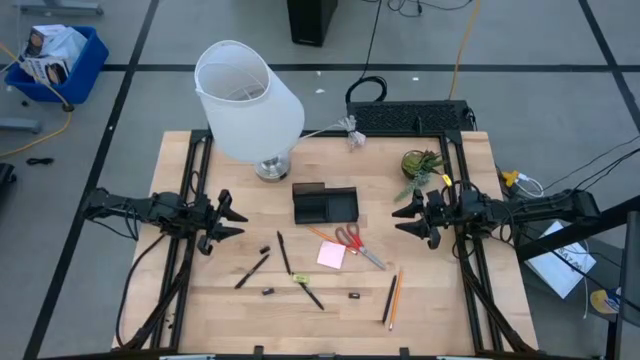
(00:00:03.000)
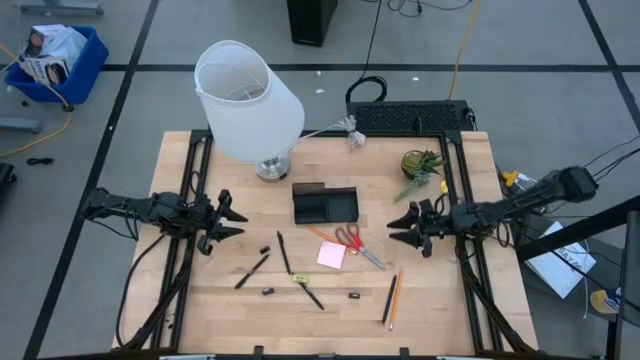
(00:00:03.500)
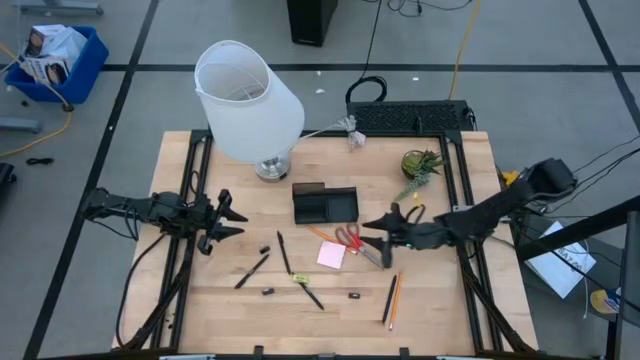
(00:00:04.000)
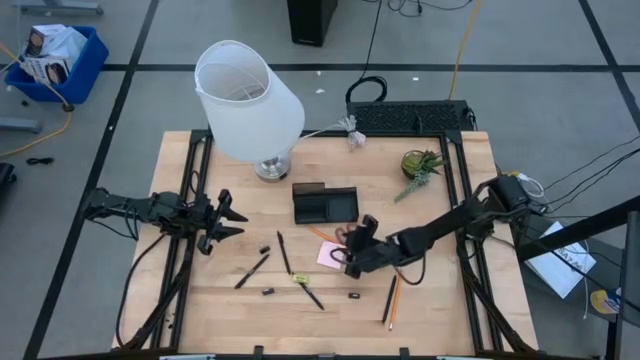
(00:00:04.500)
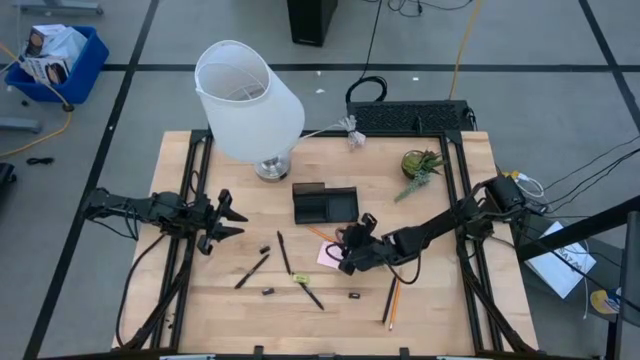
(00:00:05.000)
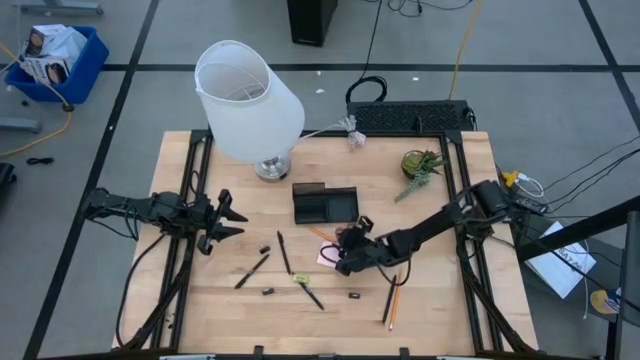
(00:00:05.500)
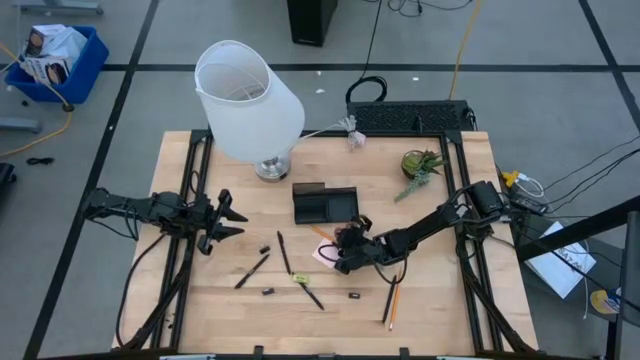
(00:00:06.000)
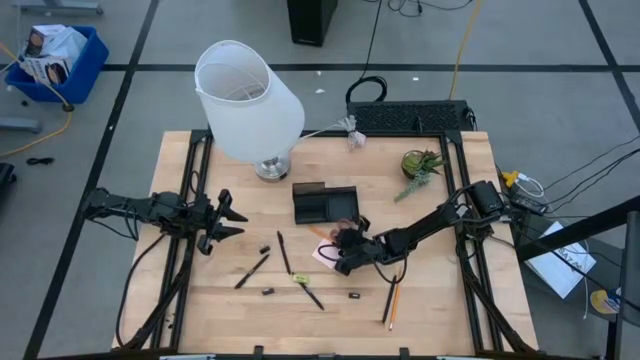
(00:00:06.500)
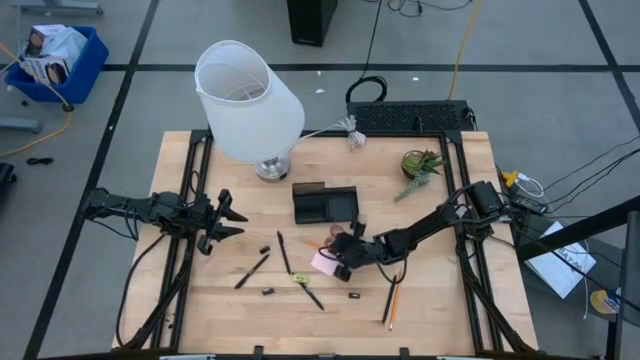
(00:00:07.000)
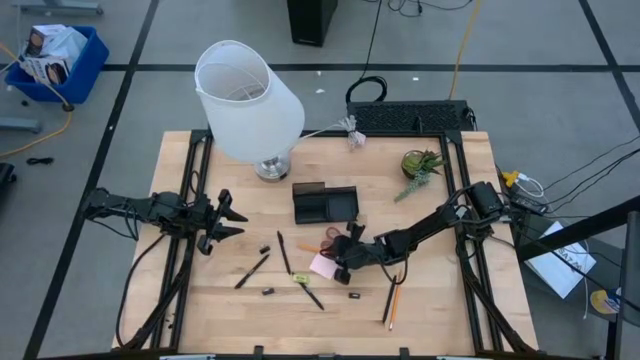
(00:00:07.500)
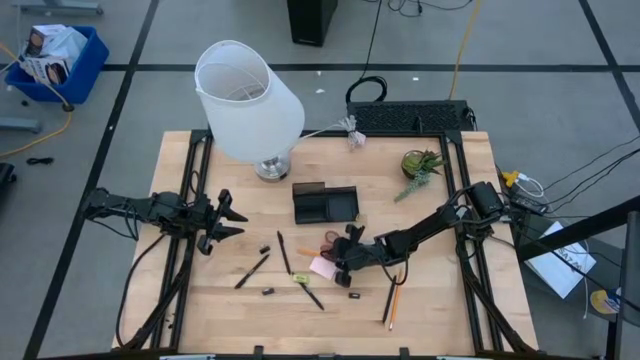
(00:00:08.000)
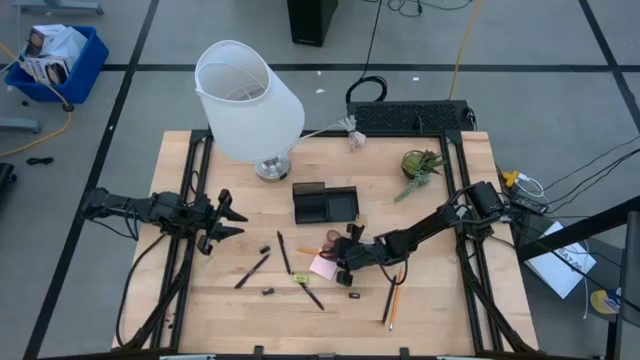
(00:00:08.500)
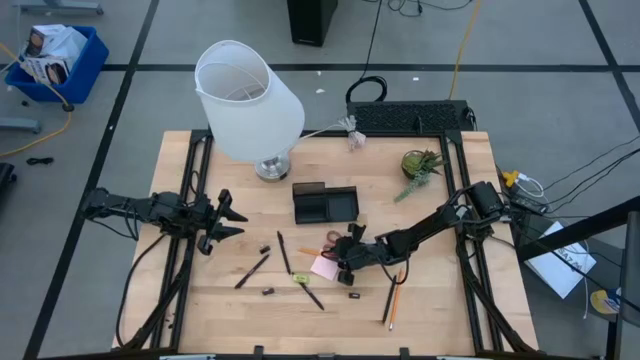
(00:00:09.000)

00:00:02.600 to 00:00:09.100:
Task: Pick and place office supplies into organizer
Put the red scissors into the top left compartment of the desk organizer

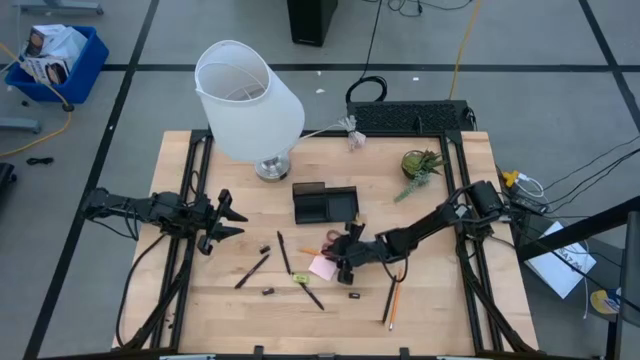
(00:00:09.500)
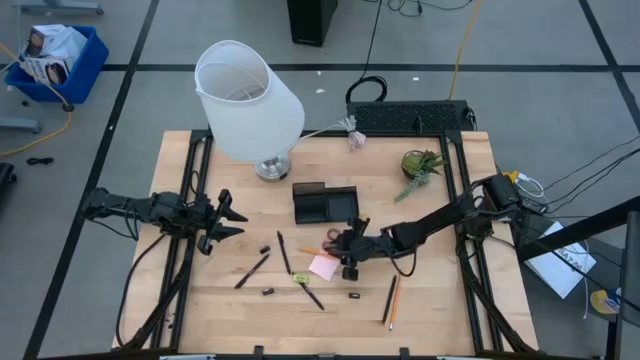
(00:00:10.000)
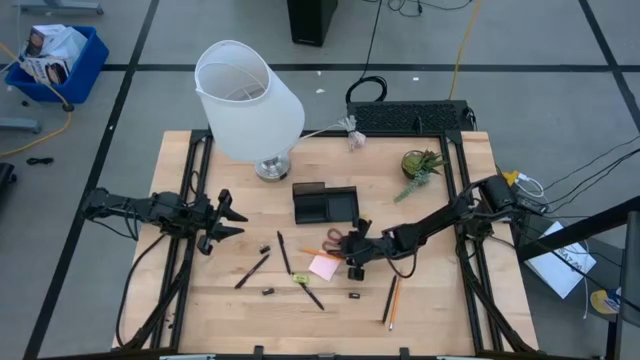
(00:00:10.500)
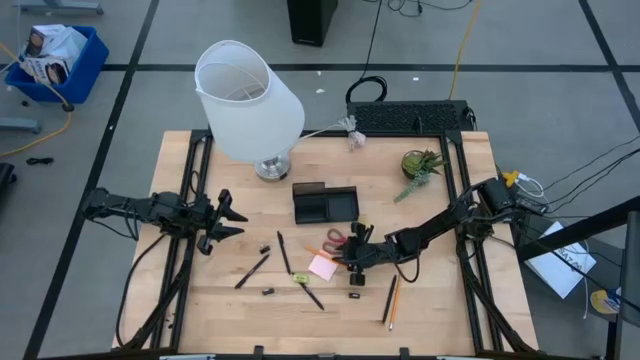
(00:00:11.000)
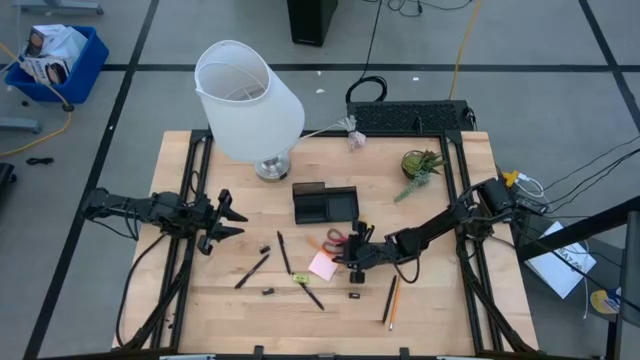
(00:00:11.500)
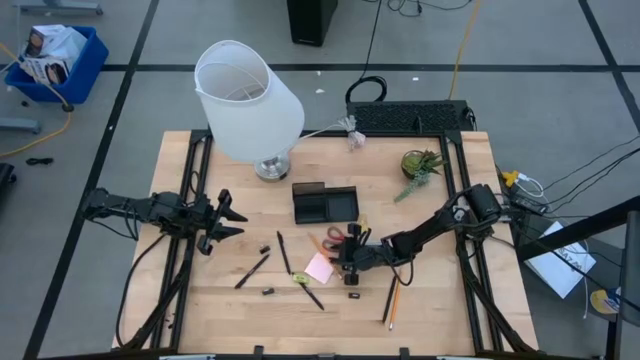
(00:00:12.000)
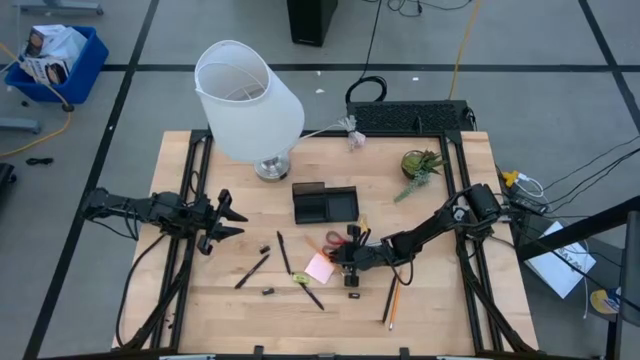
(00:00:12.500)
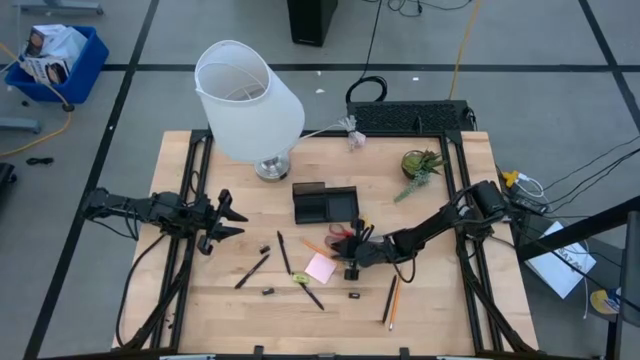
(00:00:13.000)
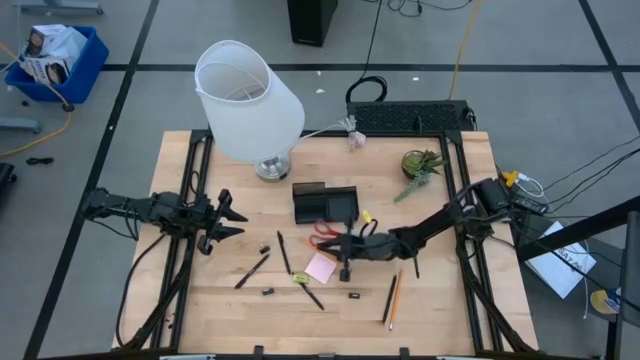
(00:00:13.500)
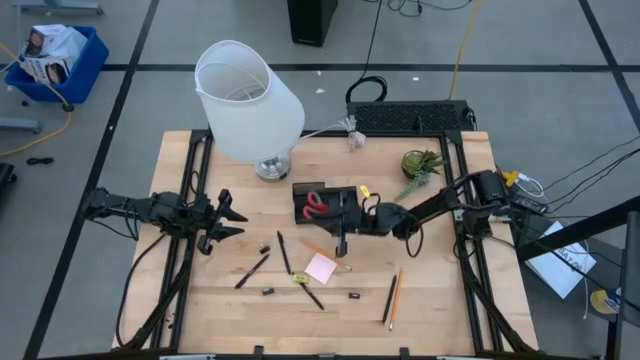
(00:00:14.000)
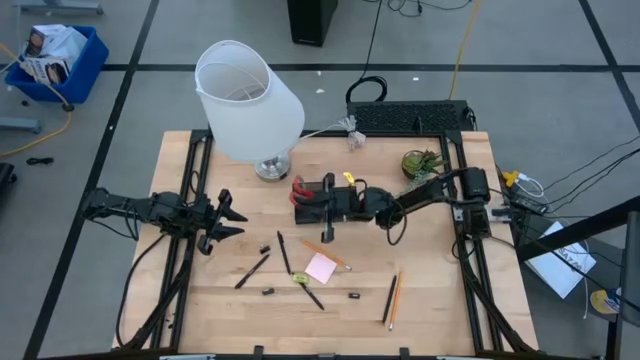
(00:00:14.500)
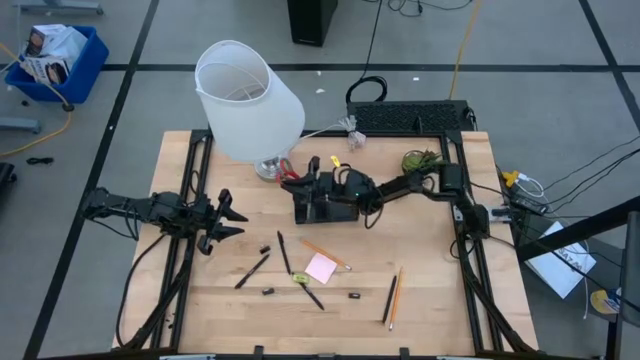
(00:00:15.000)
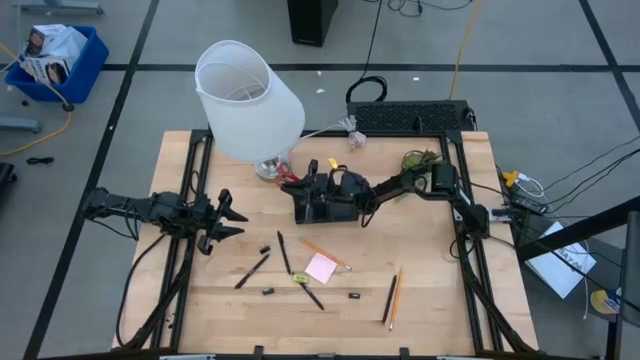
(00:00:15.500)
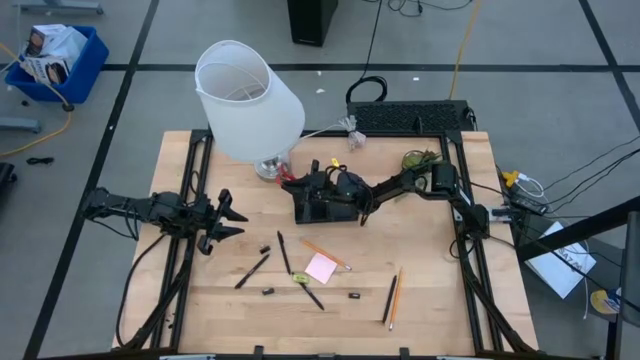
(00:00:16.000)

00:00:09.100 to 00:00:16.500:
Put the red scissors into the top left compartment of the desk organizer

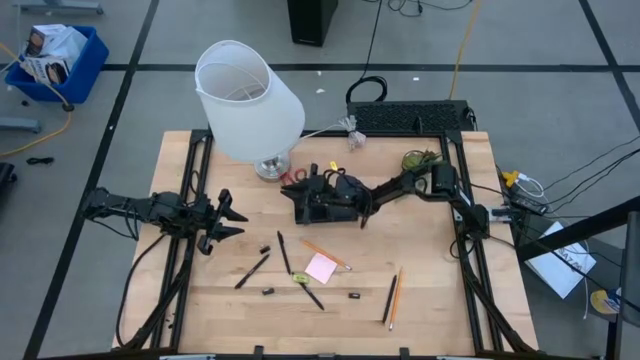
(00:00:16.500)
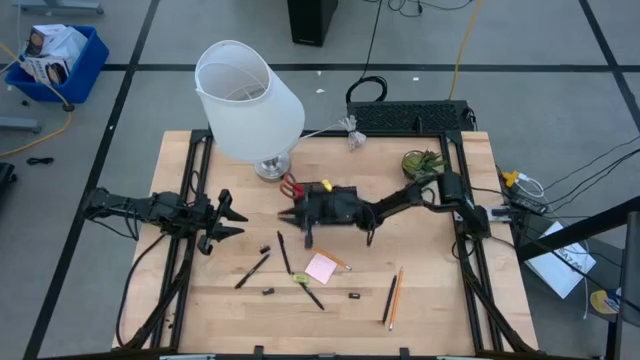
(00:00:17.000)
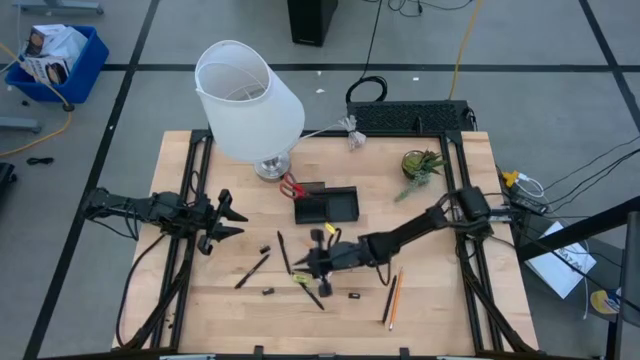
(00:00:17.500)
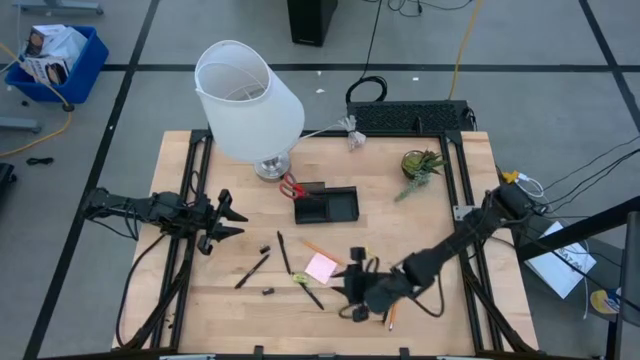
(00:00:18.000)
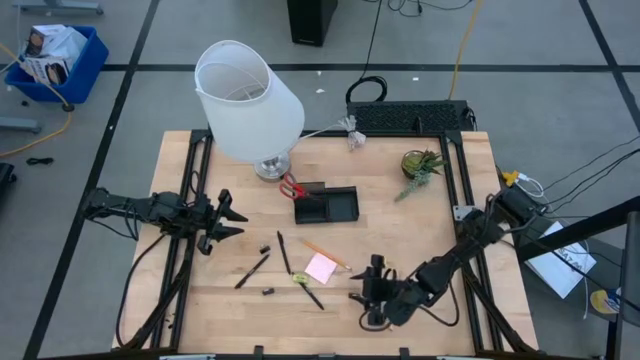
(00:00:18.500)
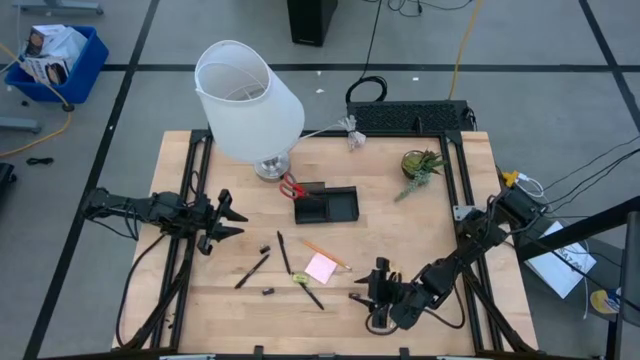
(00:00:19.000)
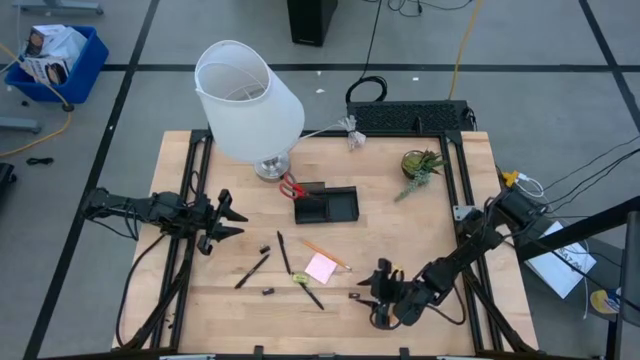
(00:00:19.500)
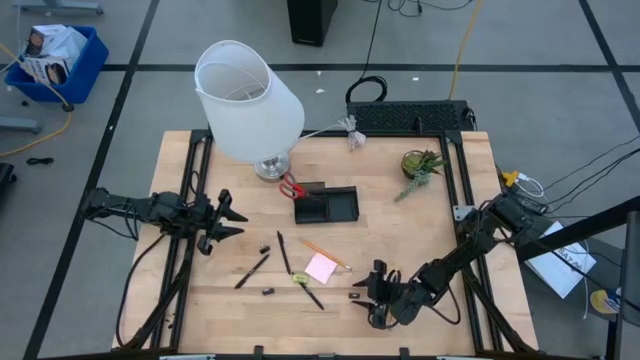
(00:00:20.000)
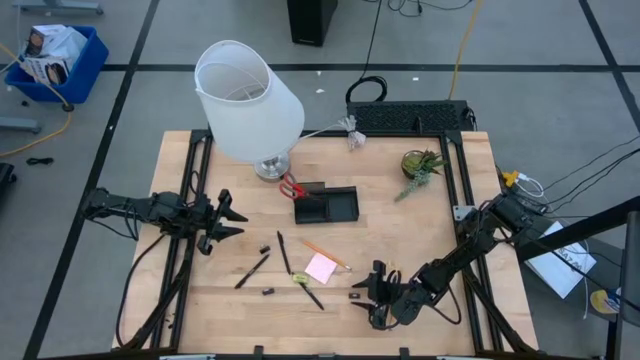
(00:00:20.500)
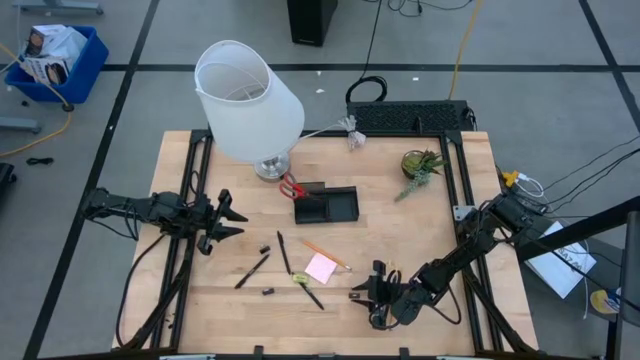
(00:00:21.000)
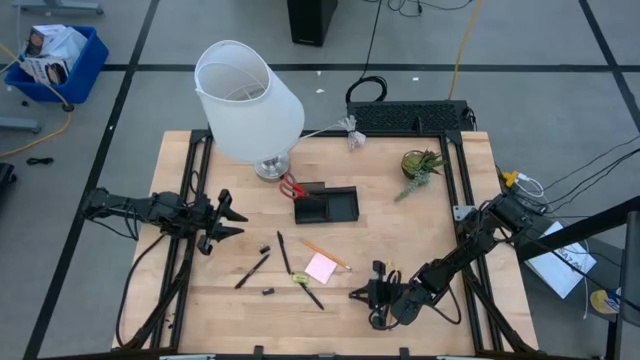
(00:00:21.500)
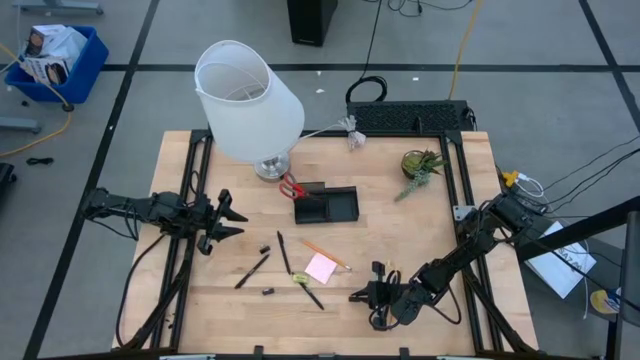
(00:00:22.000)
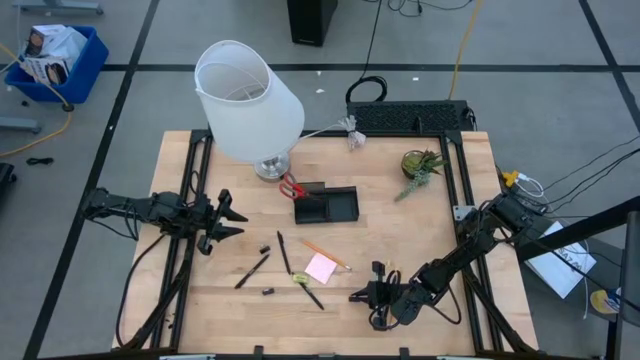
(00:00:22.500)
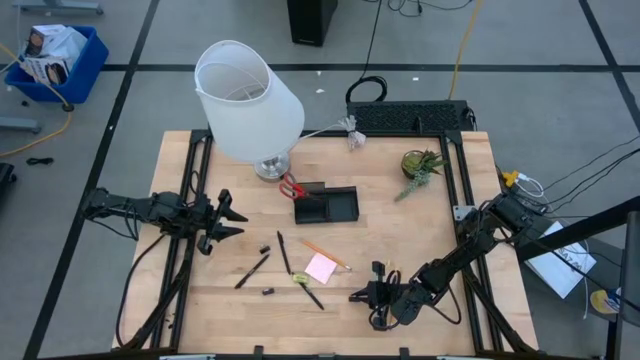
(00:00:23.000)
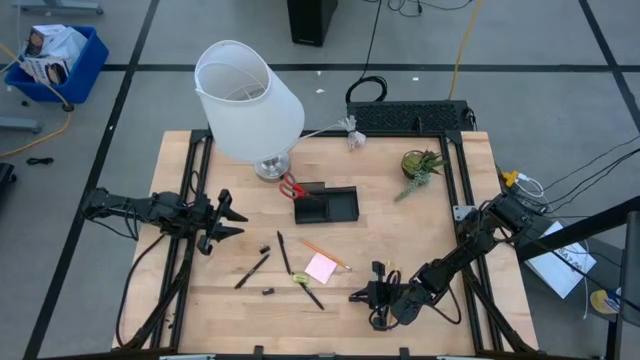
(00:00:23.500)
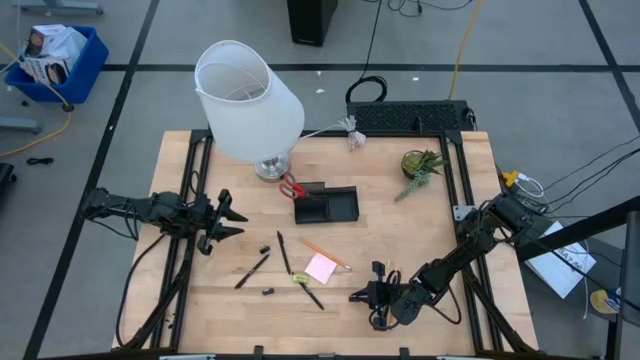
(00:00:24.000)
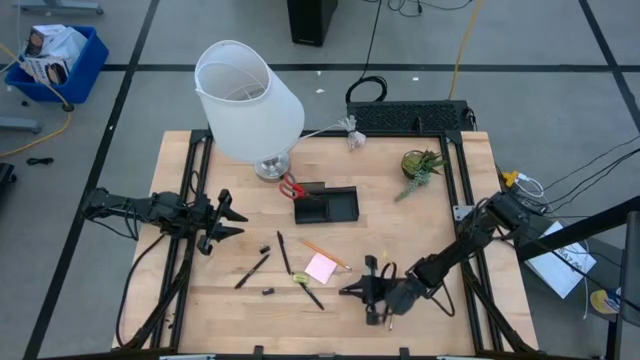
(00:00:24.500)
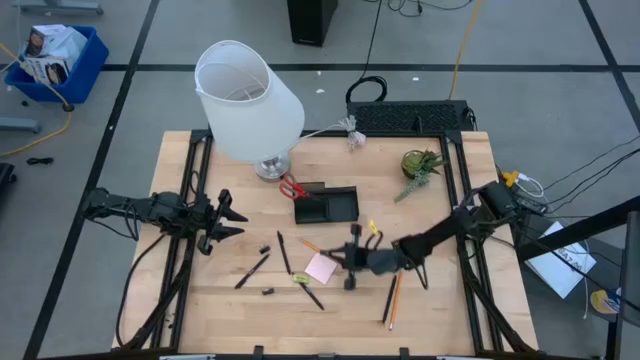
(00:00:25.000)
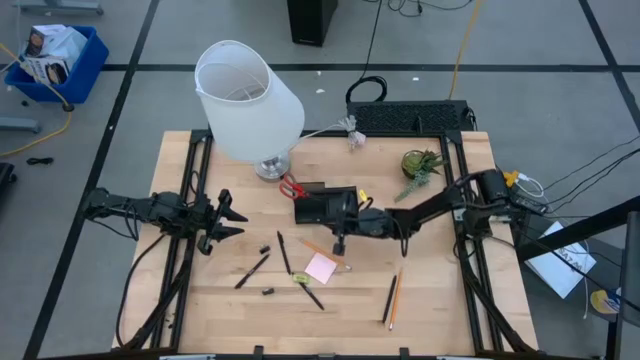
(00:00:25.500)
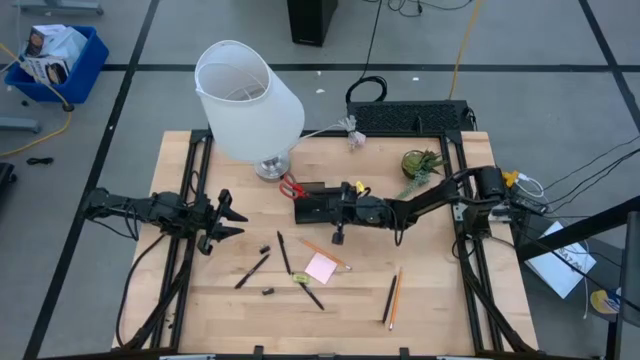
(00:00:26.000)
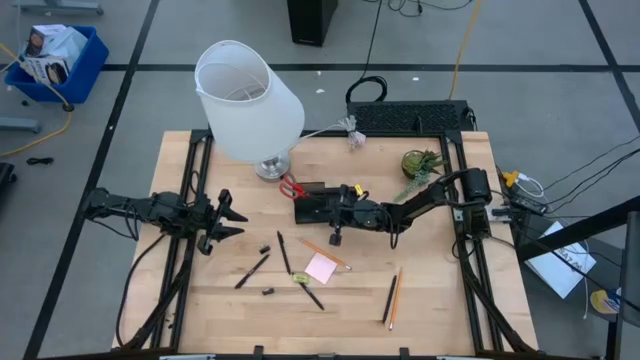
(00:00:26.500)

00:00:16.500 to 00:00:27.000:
Put the bottom right black binder clip into the bottom left compartment of the desk organizer
